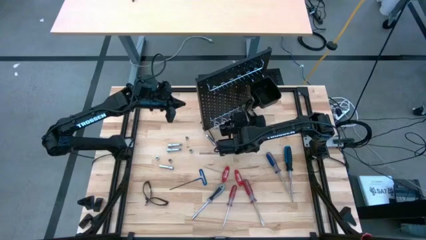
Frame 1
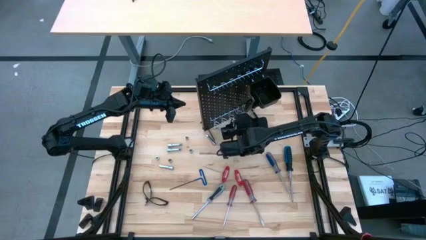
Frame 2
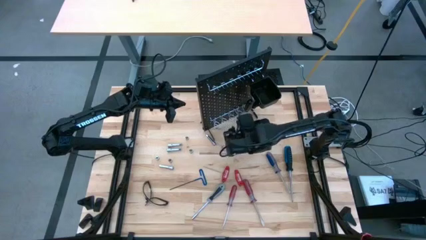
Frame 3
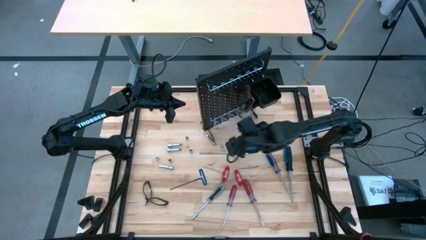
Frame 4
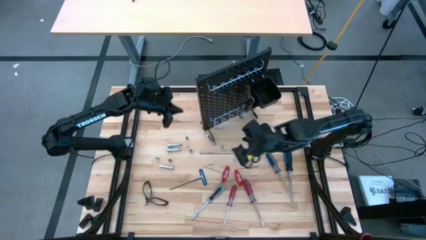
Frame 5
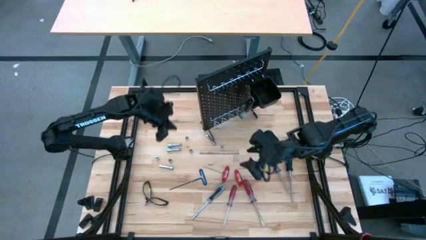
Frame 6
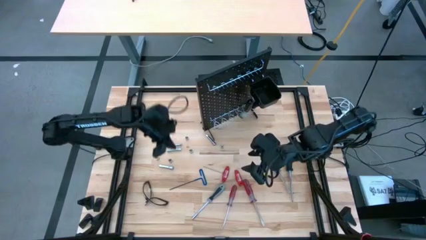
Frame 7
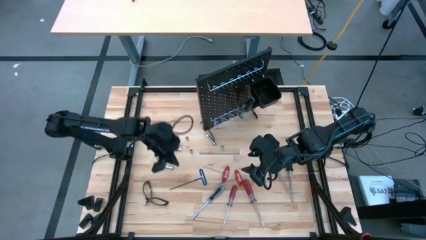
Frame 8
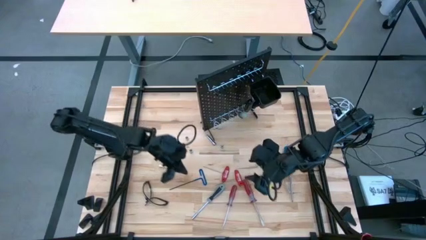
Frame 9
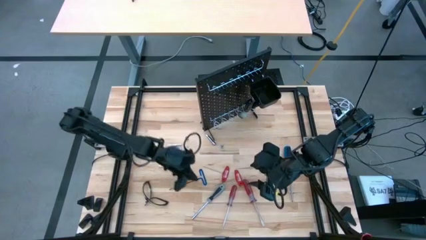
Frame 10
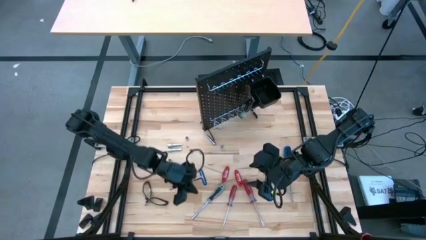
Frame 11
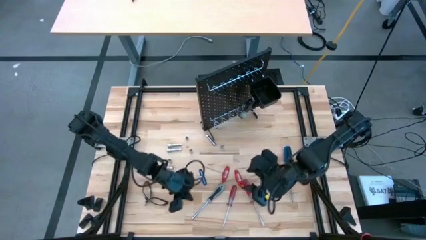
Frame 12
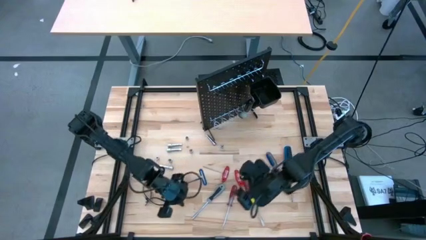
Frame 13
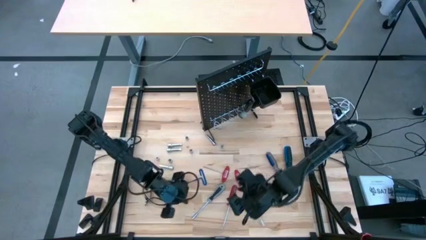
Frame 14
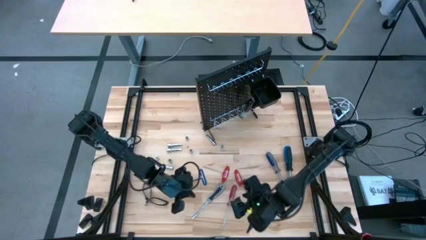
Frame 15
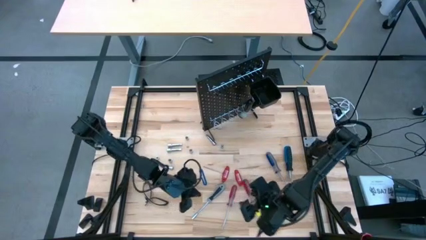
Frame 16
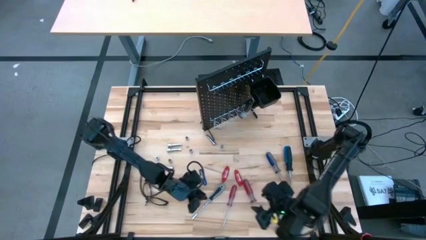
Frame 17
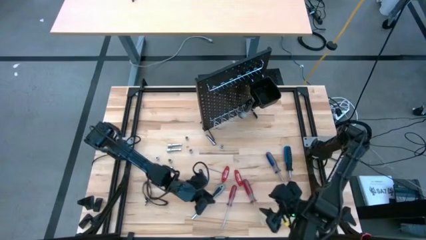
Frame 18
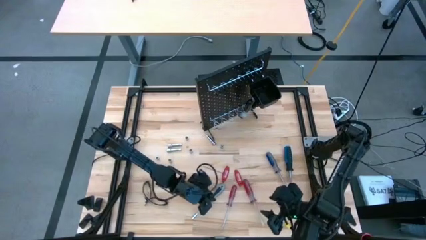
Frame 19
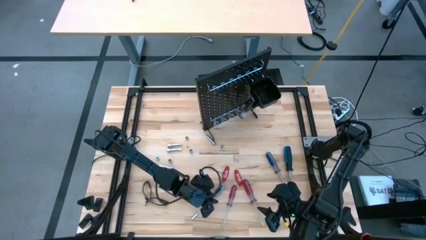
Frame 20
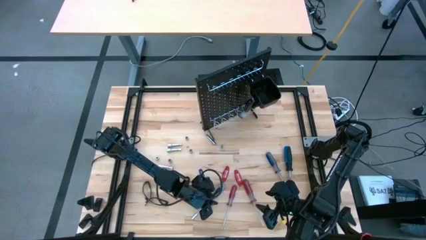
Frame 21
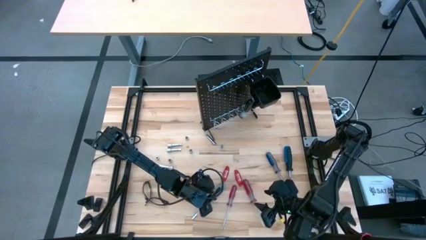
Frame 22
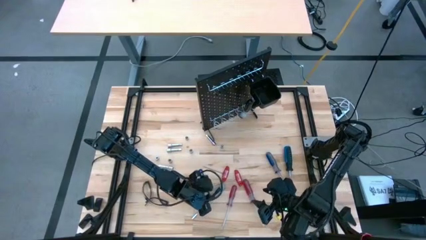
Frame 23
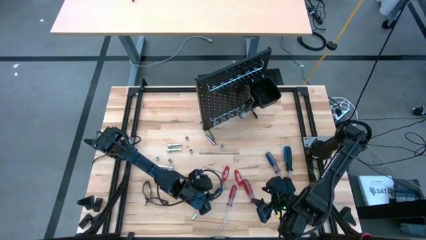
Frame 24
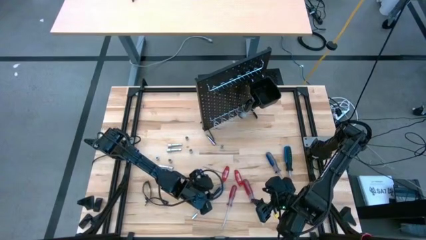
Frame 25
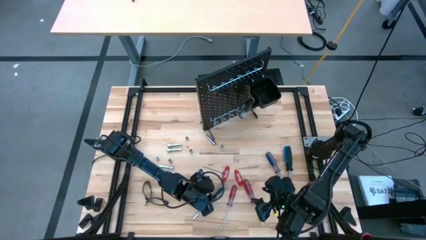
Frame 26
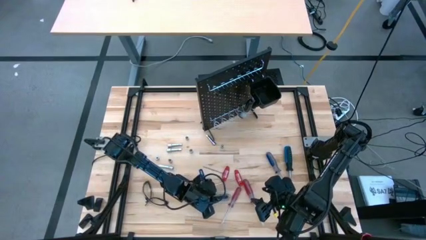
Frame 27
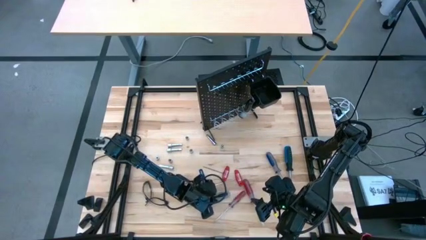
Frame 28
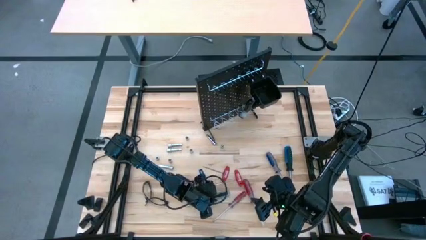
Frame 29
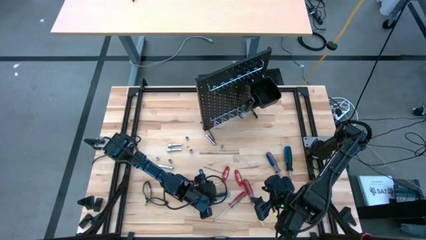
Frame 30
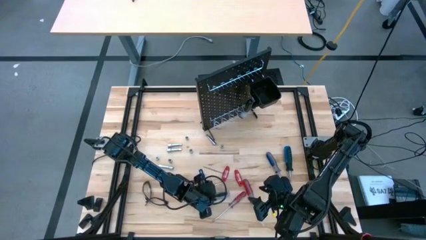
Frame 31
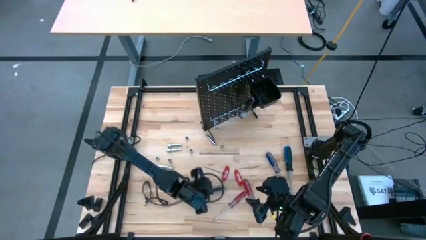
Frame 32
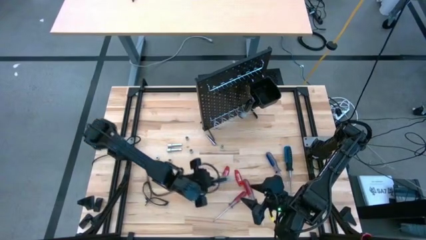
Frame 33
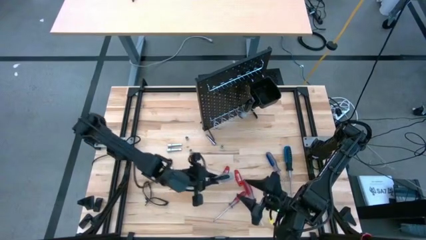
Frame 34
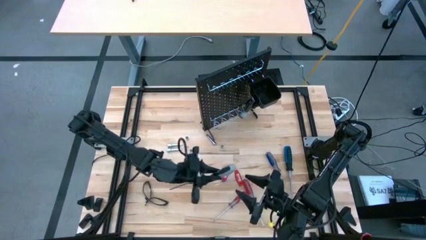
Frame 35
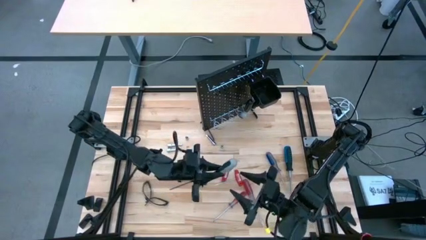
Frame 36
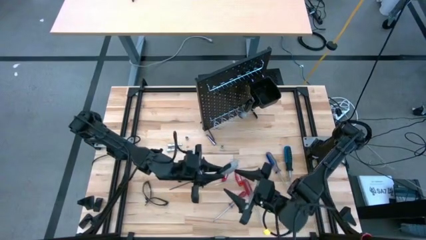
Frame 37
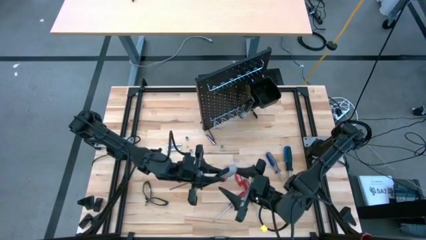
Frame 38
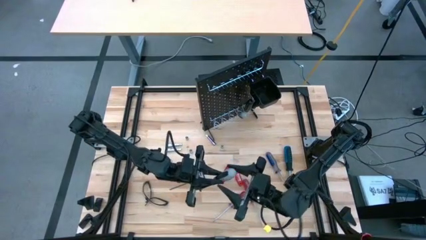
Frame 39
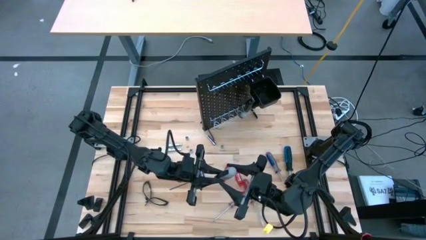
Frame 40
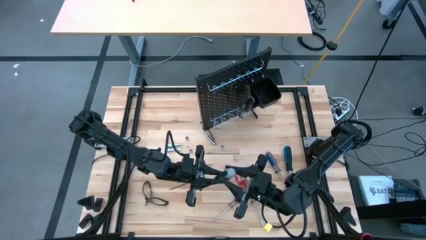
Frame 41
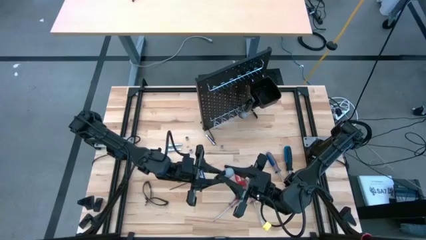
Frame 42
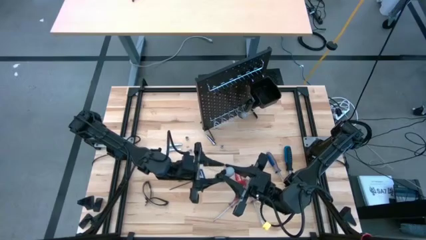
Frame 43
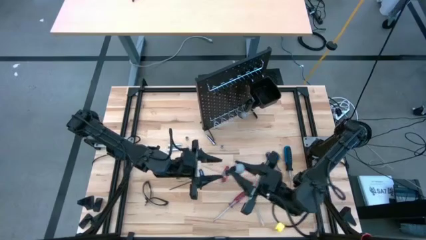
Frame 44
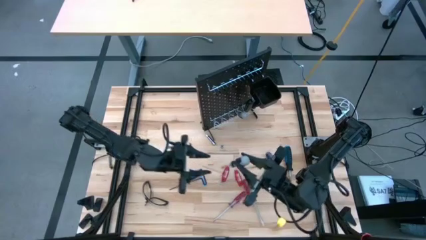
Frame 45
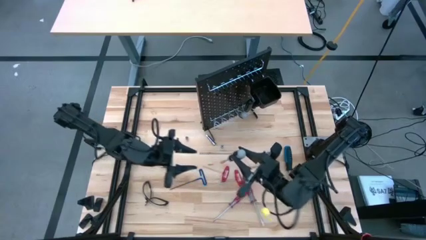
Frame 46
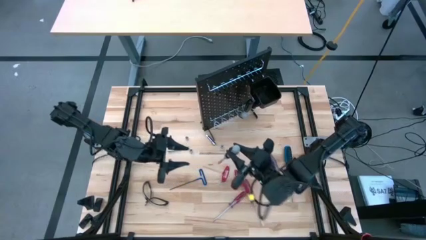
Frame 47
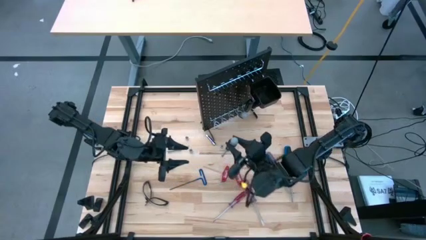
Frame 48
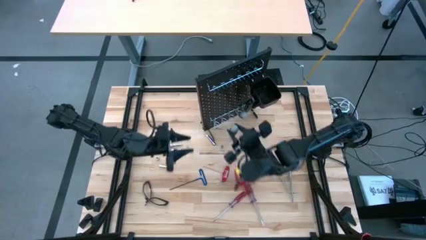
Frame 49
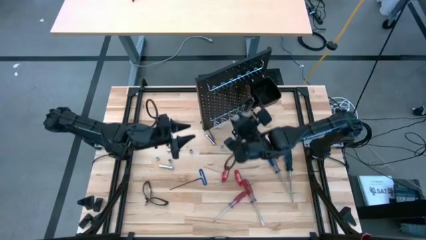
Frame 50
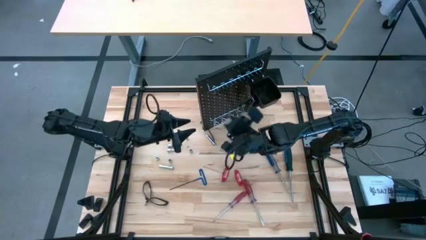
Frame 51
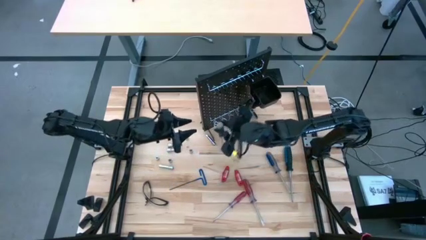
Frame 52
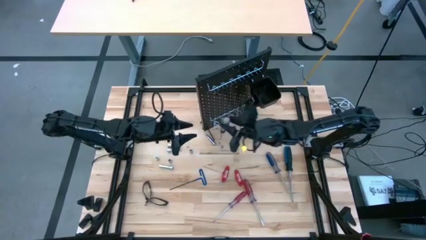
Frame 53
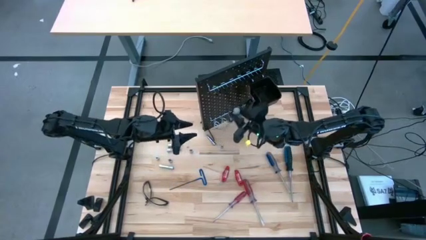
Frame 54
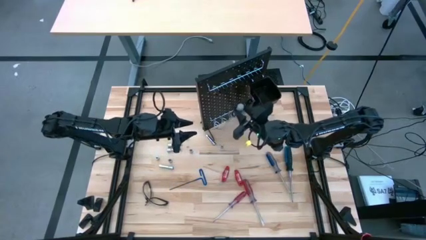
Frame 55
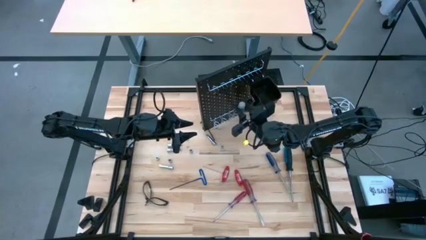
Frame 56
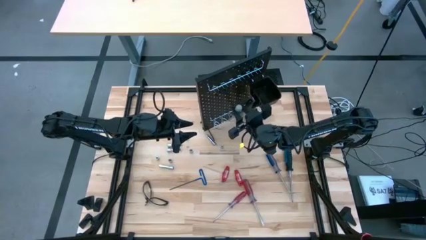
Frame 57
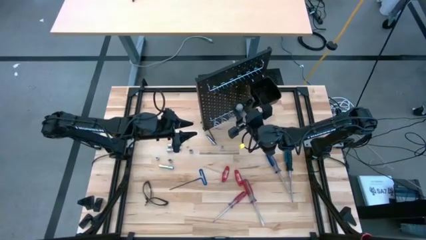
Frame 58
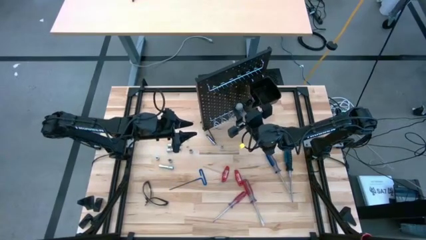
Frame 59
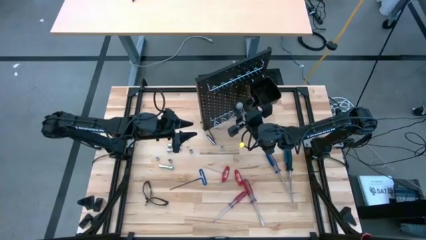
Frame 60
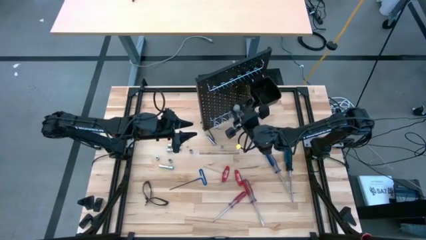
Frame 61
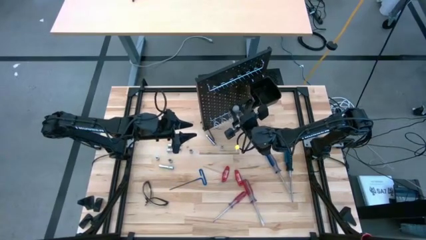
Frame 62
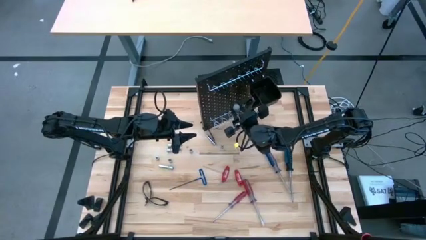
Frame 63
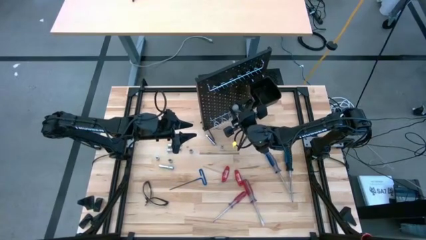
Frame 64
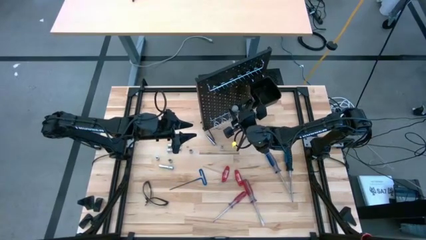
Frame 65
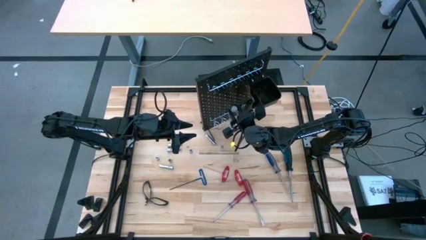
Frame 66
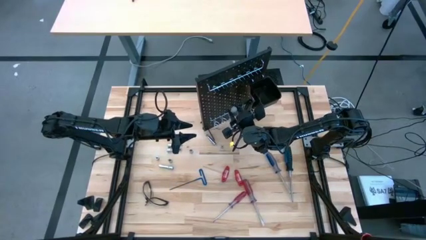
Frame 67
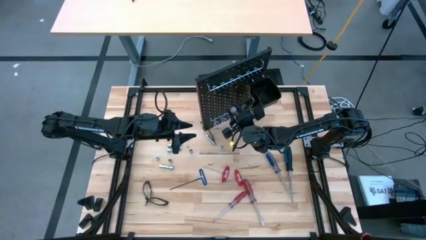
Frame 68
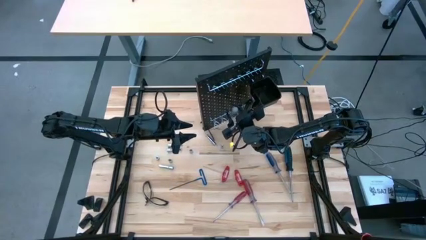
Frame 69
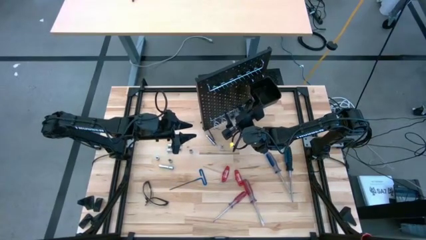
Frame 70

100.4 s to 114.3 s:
Task: Hang tools onto peg board
Hang the gray-black screwdriver on the pegboard

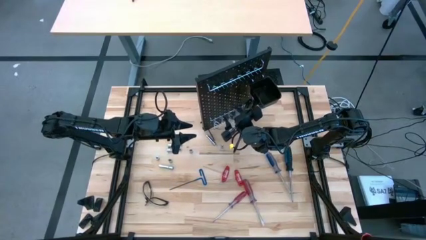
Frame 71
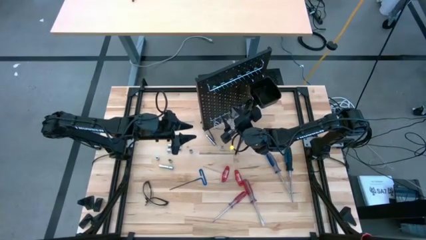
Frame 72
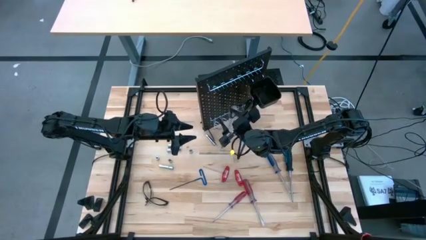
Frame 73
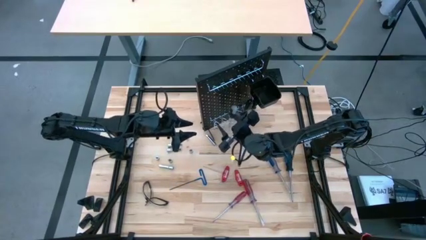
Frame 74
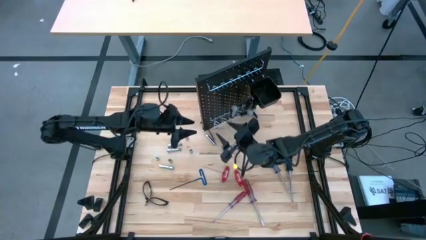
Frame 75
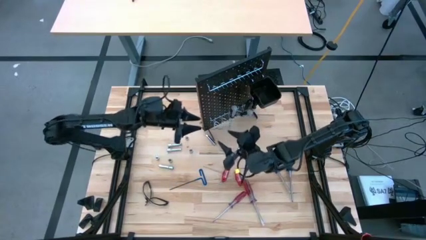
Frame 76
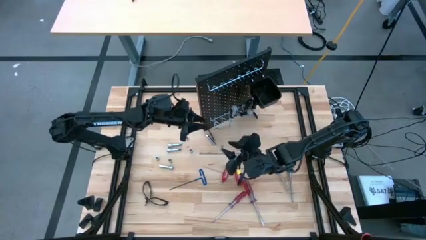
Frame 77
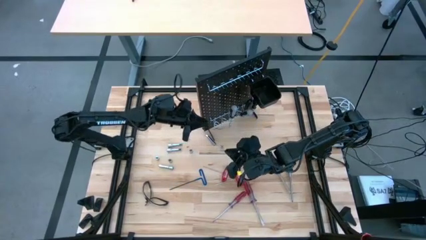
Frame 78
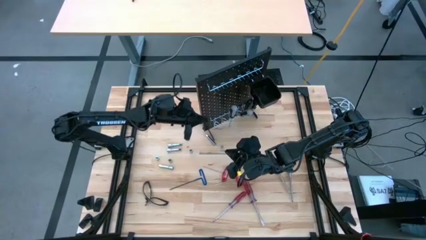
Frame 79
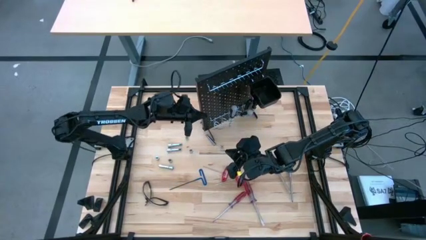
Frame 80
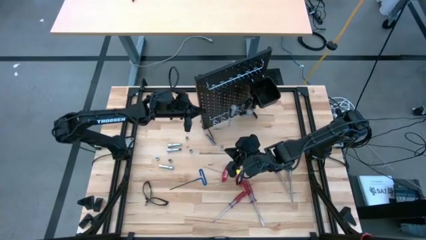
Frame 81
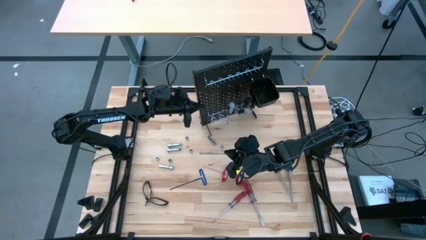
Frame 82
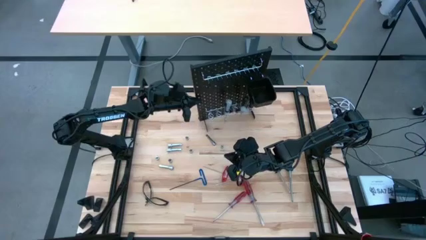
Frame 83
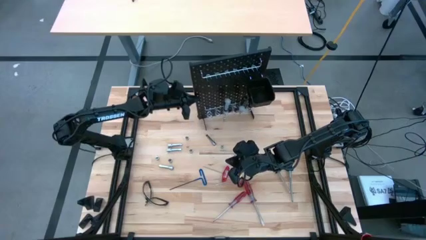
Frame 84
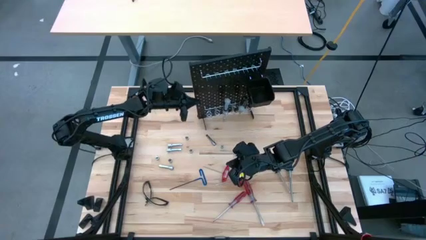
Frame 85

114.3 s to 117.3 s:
Adjust the pegboard on the table
